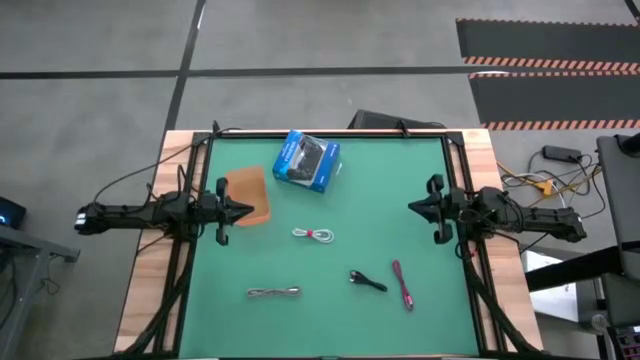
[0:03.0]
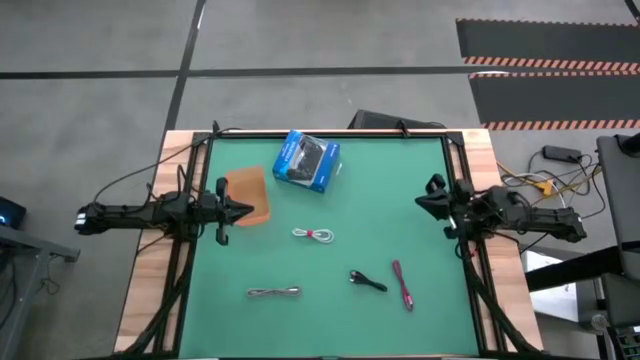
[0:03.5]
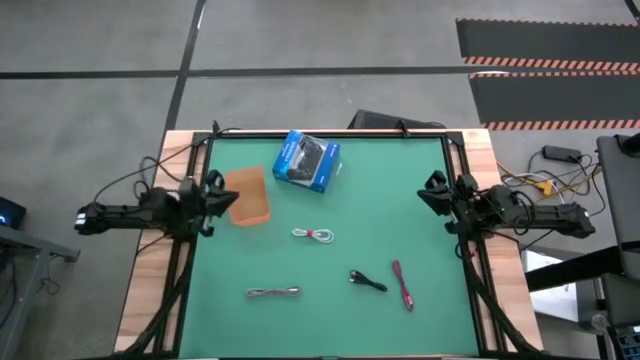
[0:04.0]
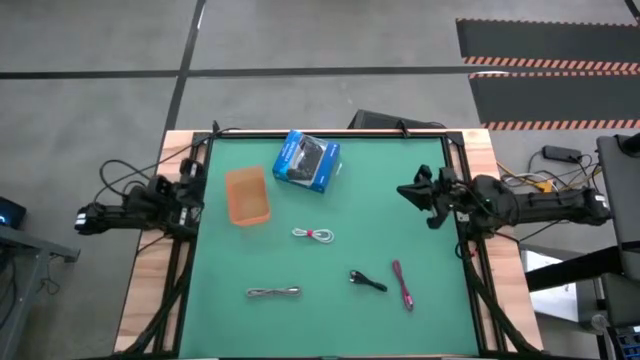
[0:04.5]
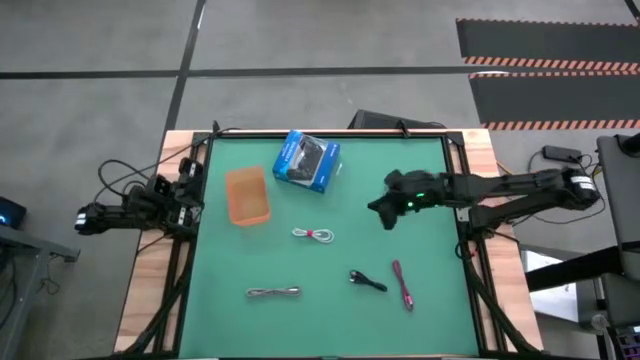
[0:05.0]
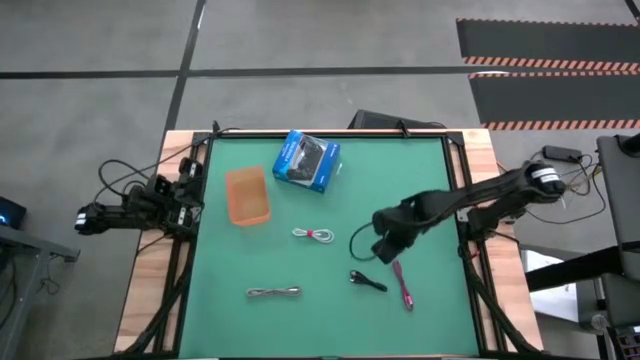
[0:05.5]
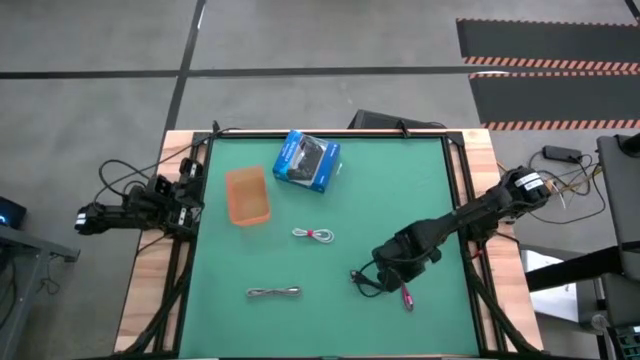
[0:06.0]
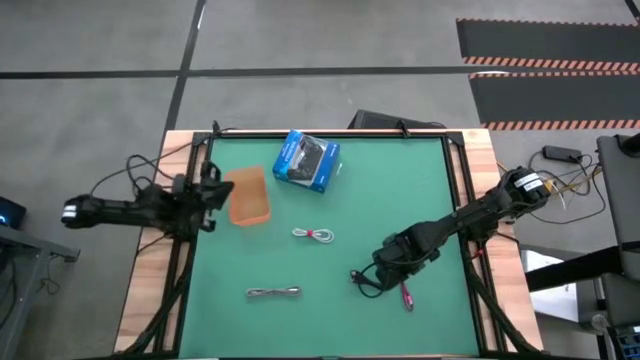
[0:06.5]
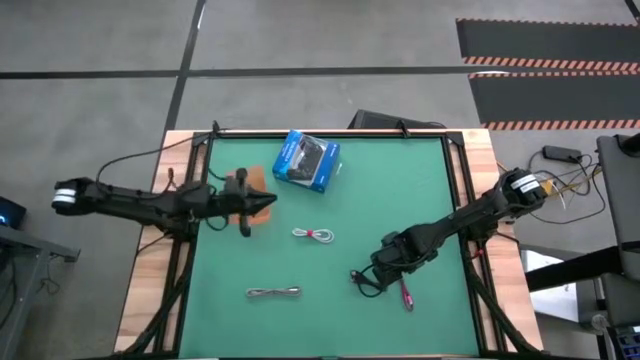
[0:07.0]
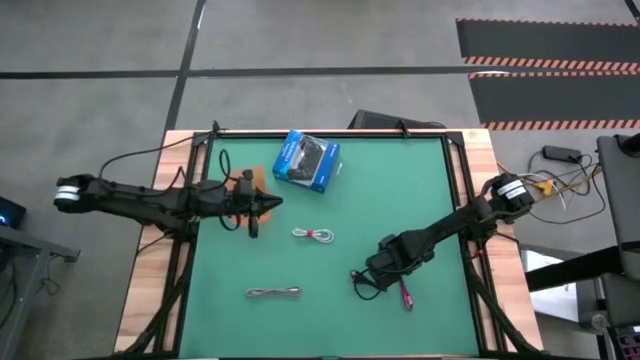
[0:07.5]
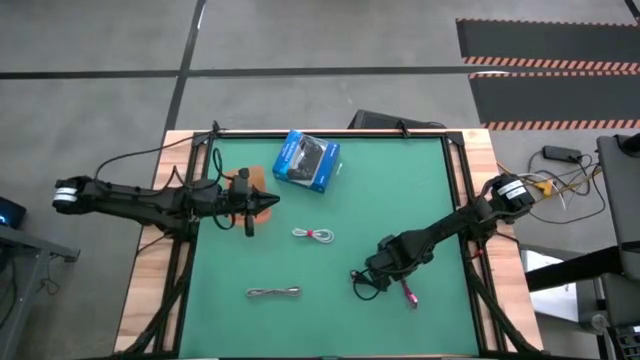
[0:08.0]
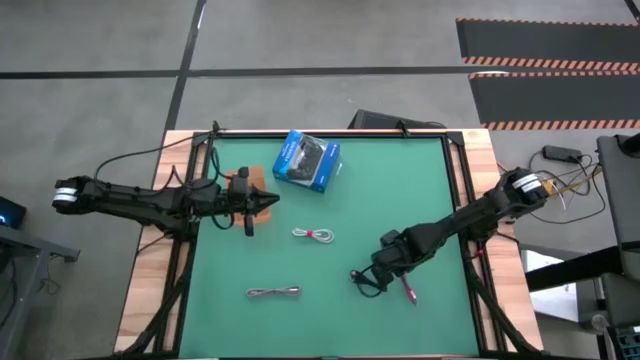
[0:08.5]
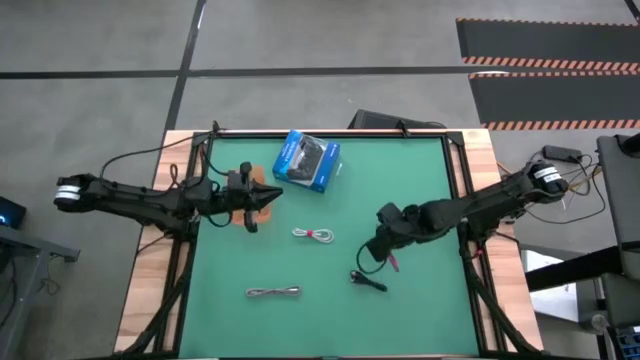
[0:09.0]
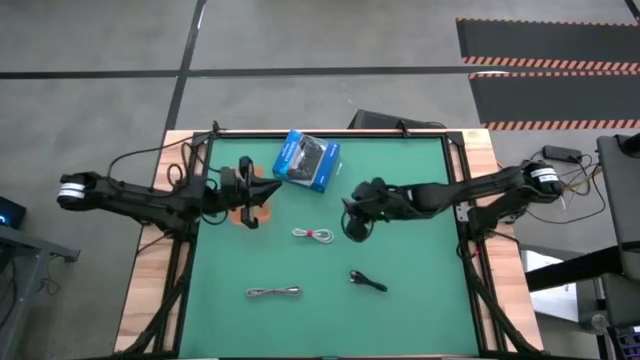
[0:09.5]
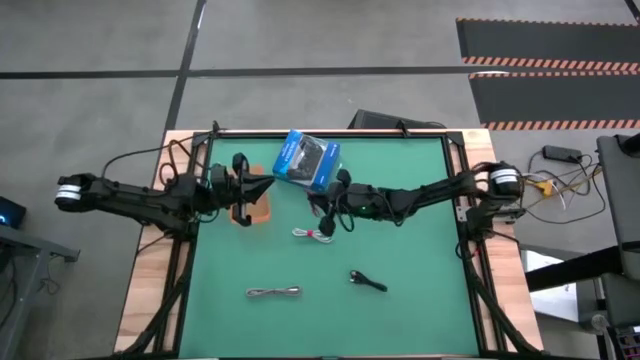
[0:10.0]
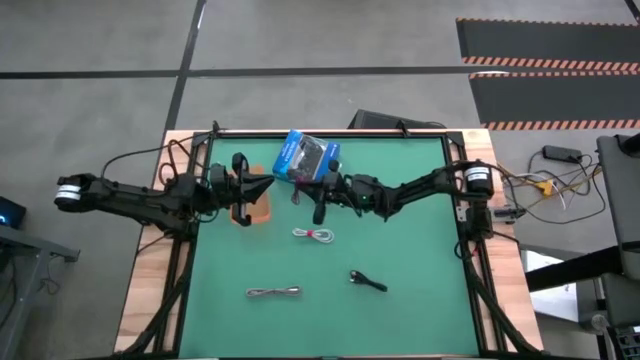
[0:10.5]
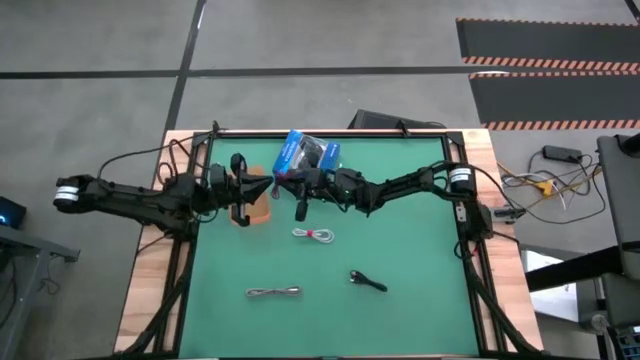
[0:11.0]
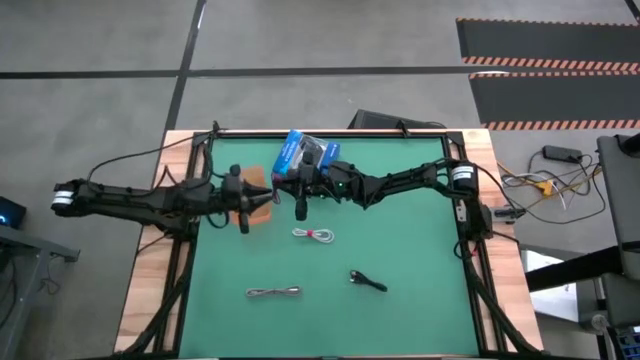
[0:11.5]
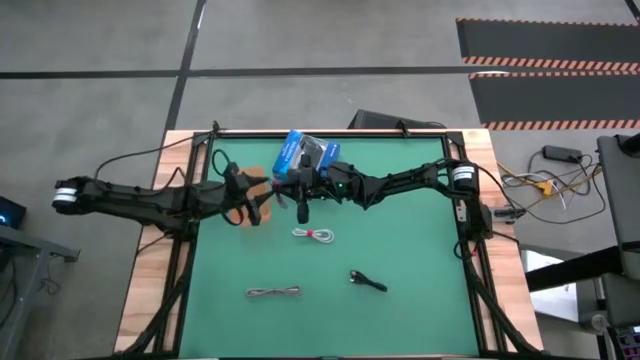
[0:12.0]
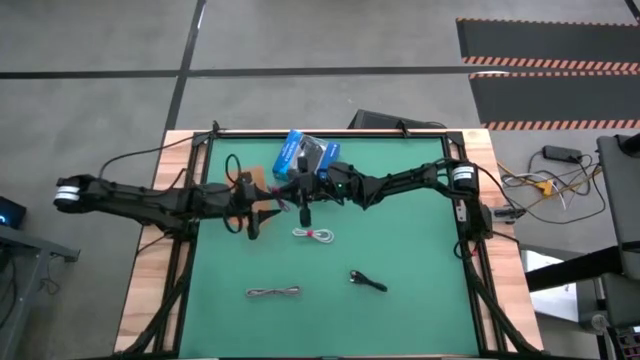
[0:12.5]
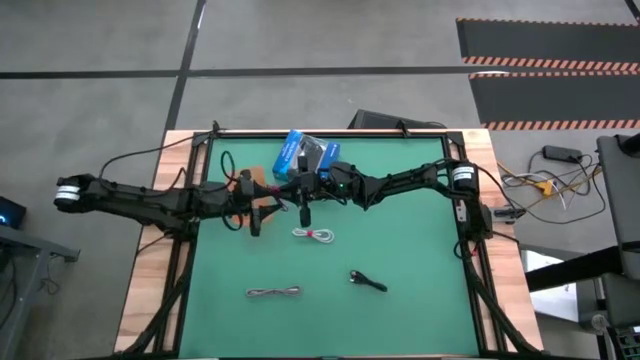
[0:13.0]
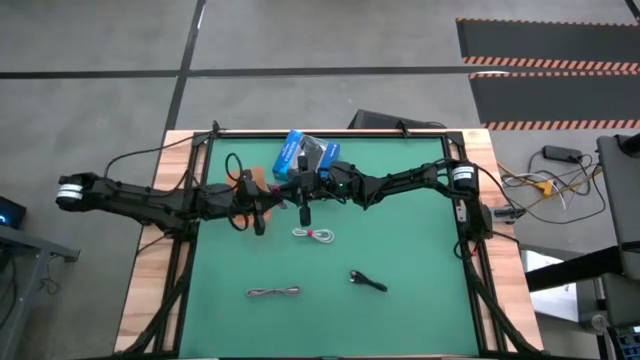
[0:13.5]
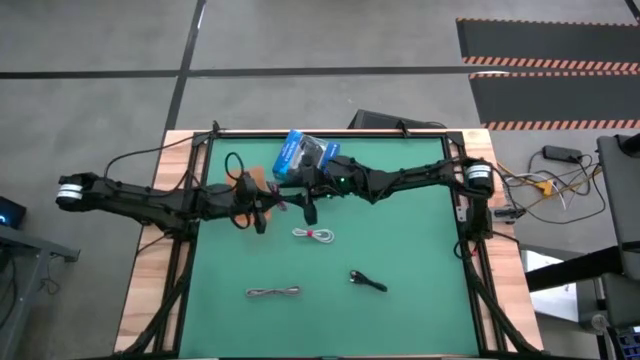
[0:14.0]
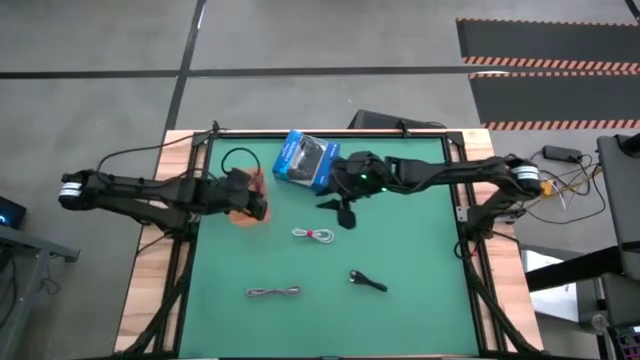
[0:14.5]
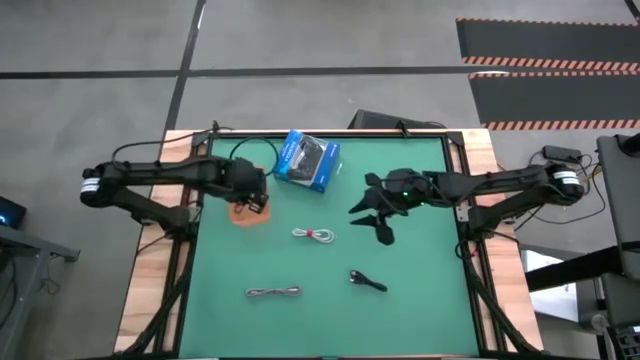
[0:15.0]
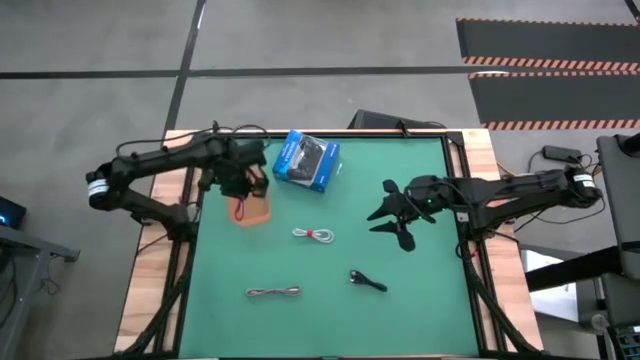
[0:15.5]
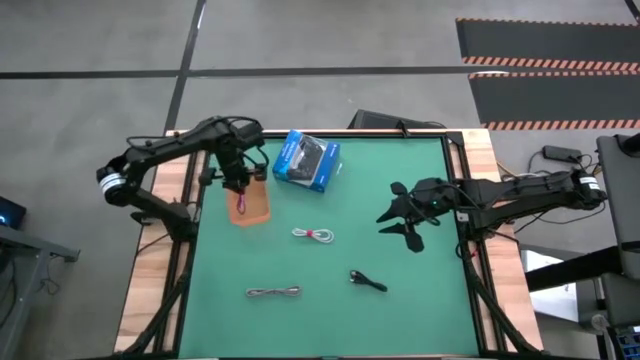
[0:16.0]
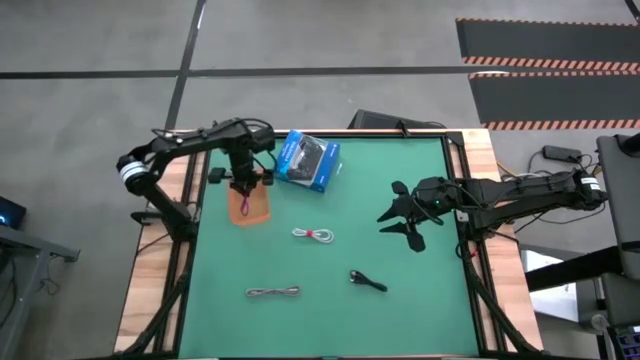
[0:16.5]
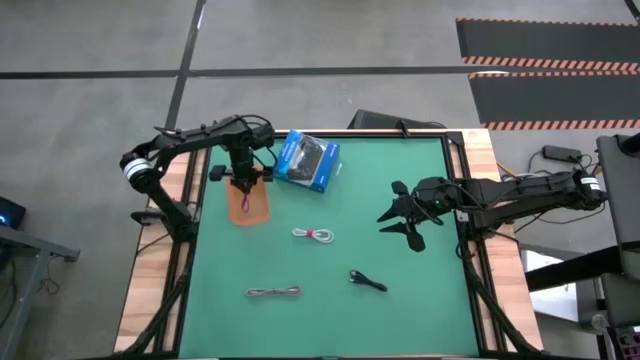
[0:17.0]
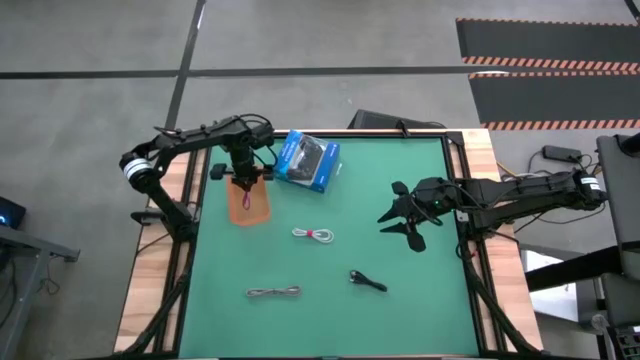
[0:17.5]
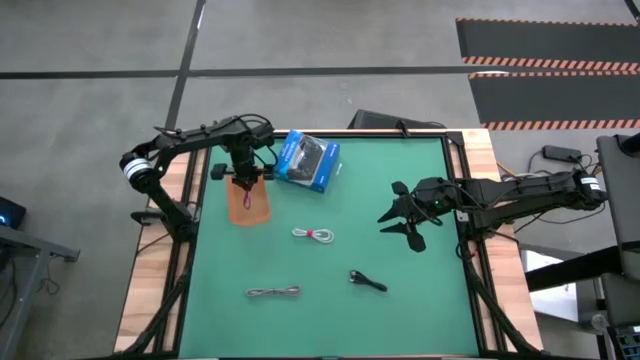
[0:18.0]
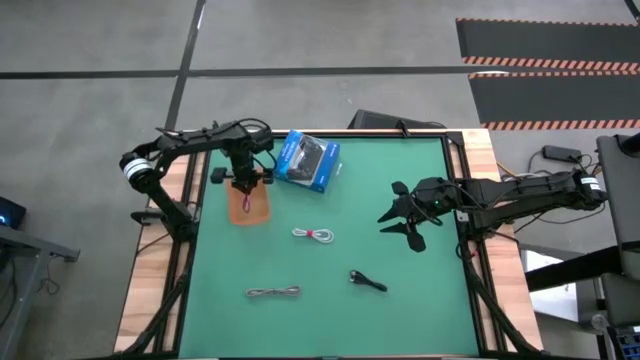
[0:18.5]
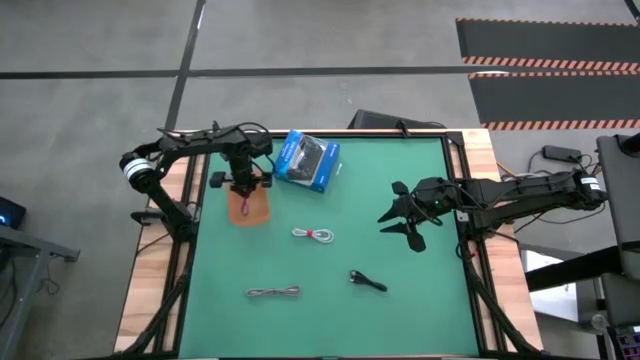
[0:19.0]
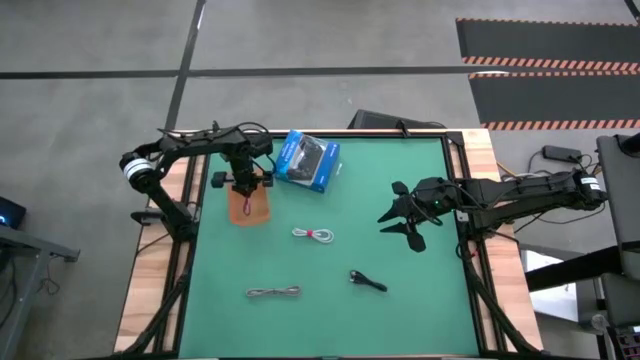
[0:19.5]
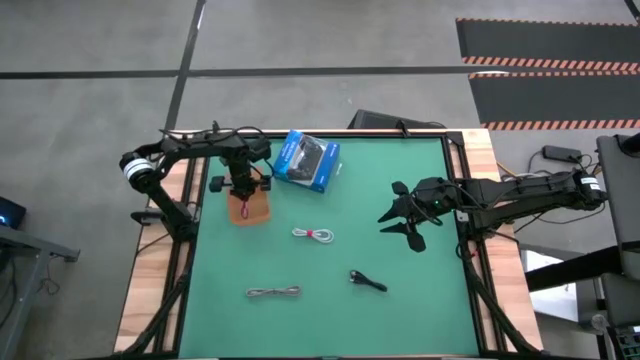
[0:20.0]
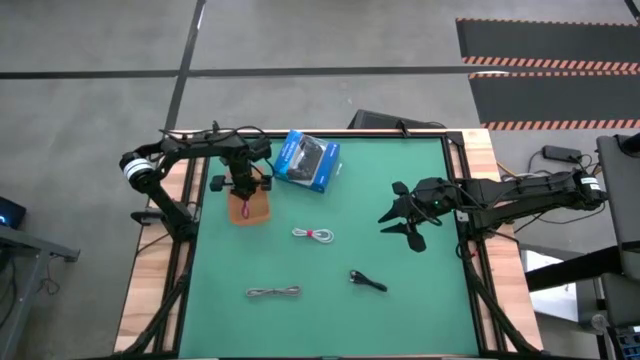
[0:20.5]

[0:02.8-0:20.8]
Task: Pick and place USB-C Cables
Put the red and black charger cable into the orange bin
